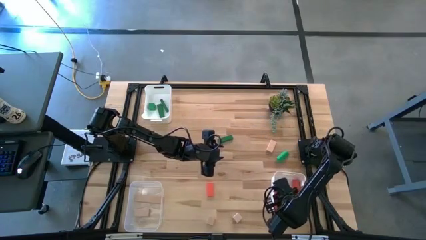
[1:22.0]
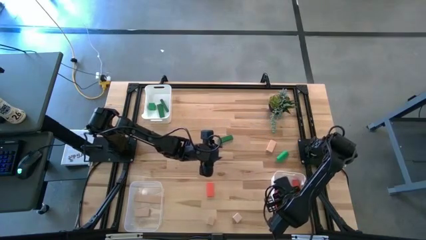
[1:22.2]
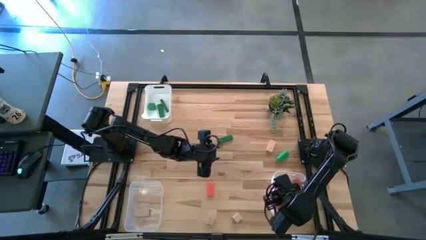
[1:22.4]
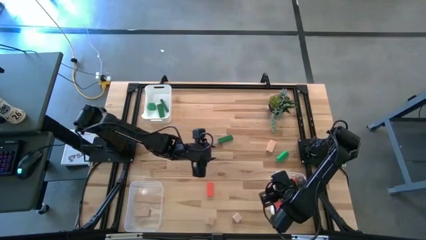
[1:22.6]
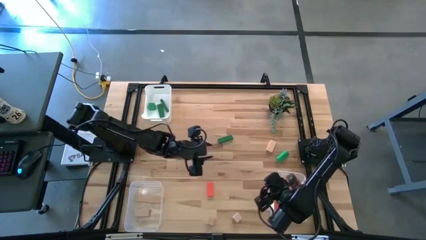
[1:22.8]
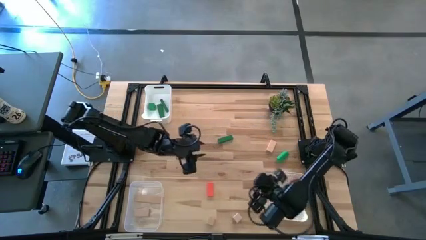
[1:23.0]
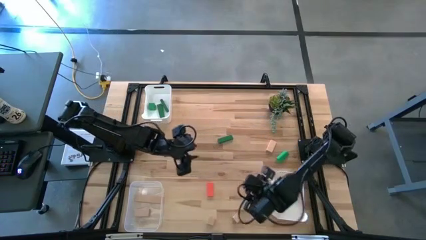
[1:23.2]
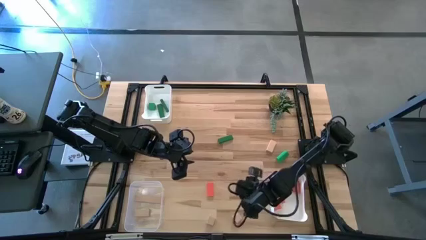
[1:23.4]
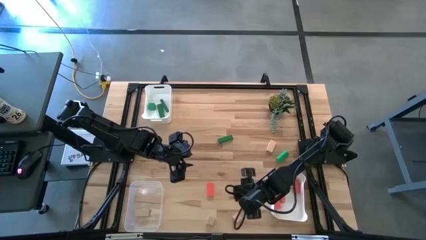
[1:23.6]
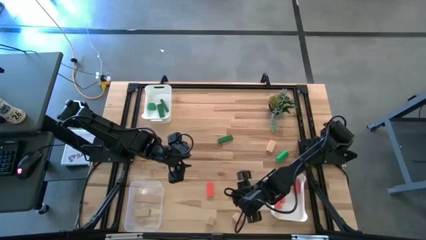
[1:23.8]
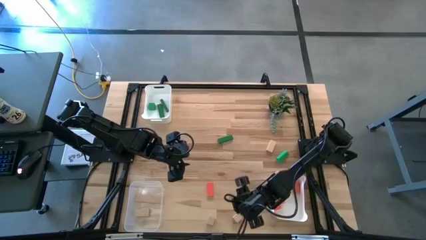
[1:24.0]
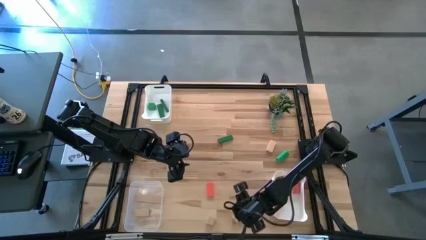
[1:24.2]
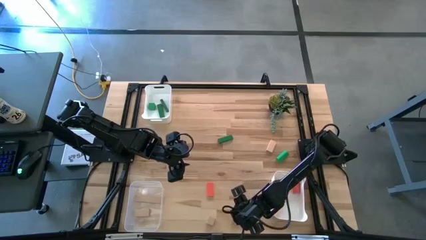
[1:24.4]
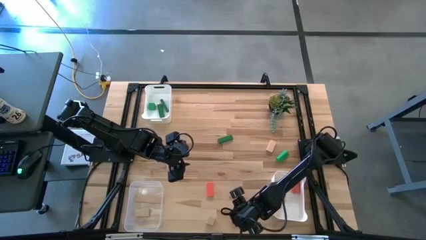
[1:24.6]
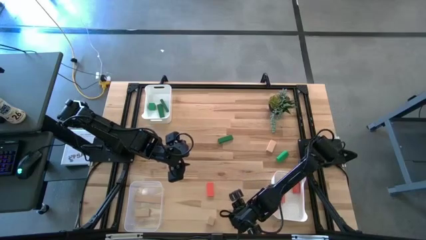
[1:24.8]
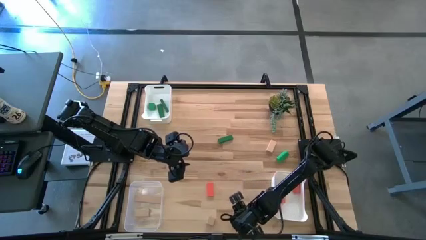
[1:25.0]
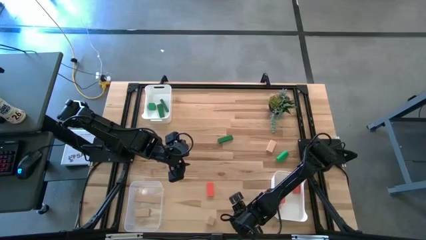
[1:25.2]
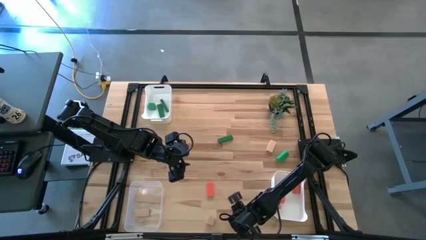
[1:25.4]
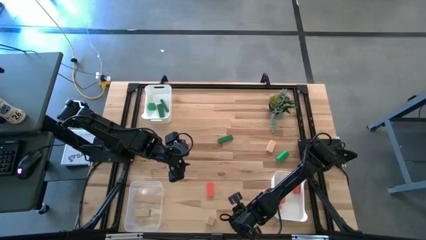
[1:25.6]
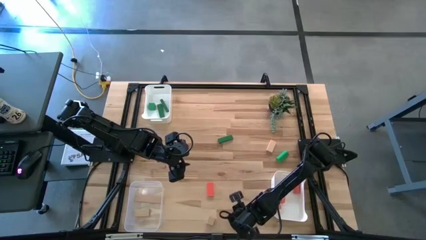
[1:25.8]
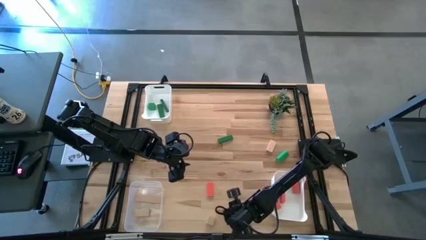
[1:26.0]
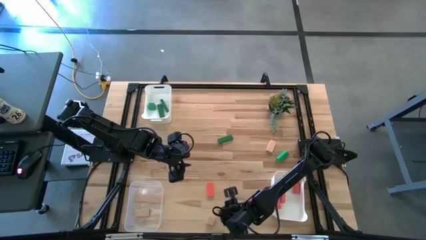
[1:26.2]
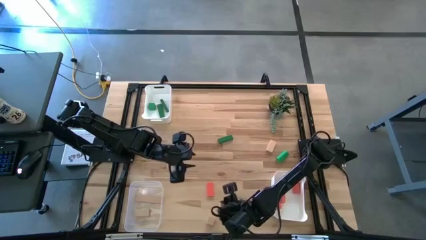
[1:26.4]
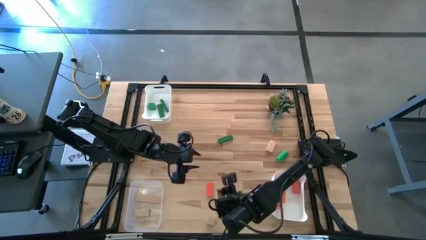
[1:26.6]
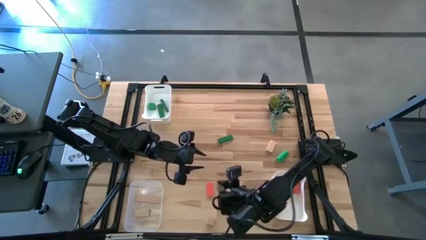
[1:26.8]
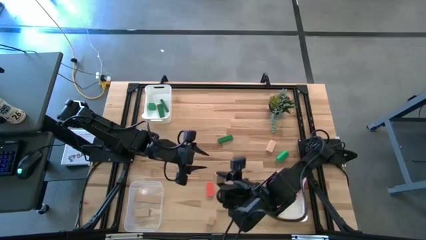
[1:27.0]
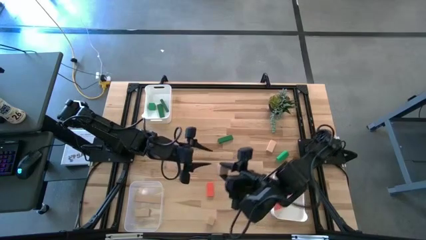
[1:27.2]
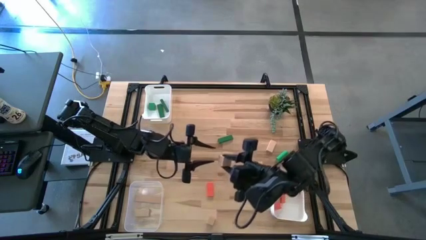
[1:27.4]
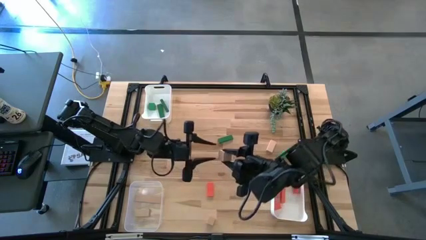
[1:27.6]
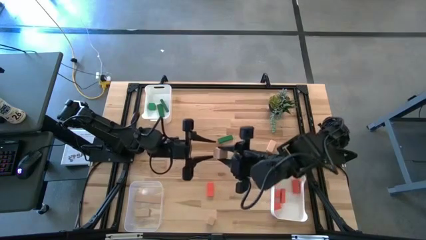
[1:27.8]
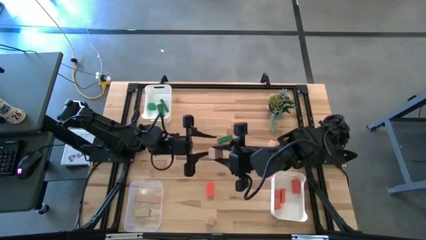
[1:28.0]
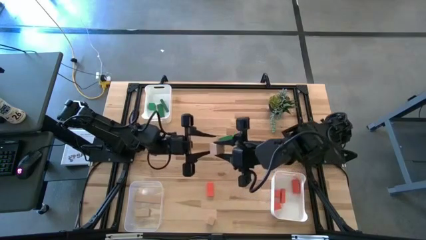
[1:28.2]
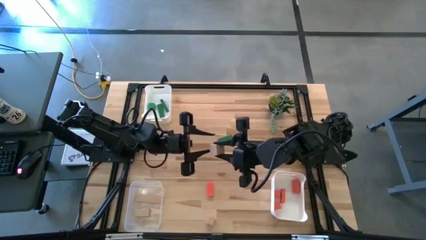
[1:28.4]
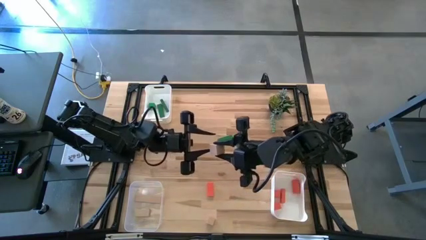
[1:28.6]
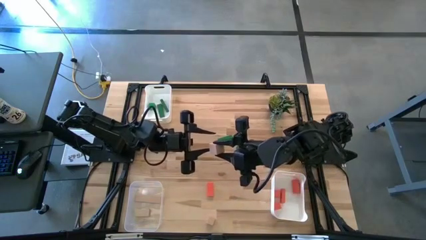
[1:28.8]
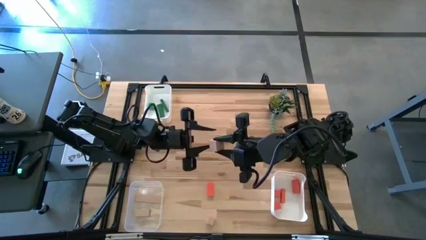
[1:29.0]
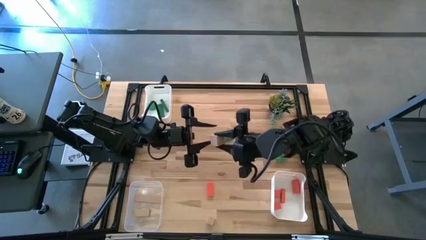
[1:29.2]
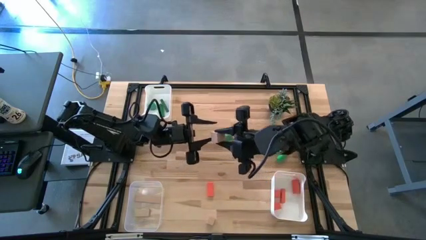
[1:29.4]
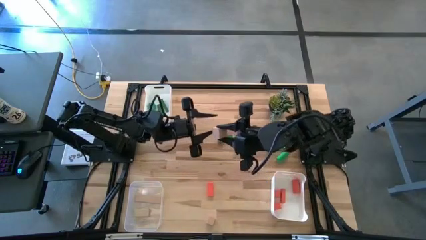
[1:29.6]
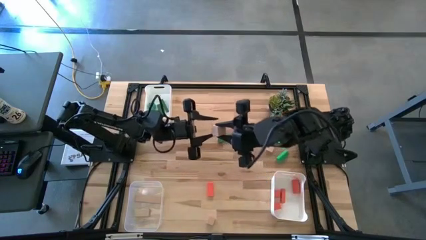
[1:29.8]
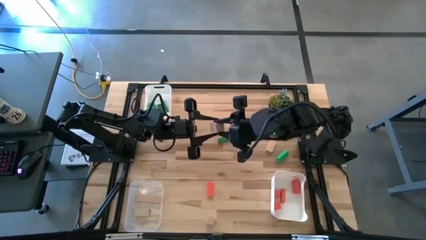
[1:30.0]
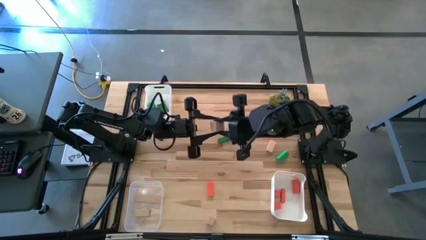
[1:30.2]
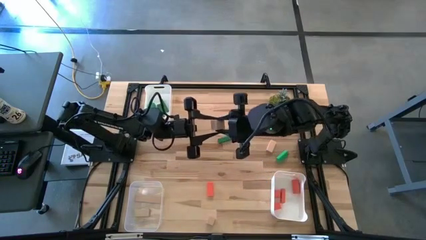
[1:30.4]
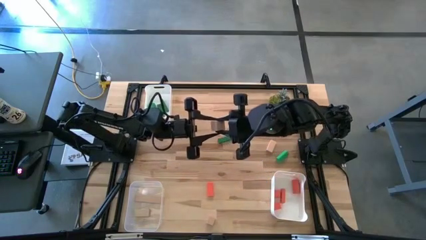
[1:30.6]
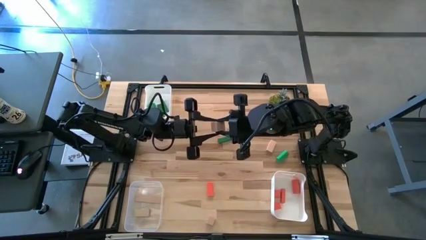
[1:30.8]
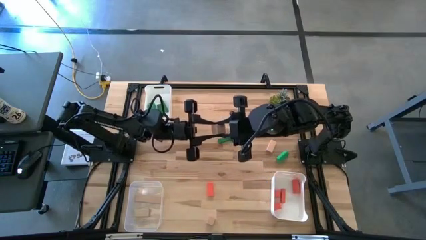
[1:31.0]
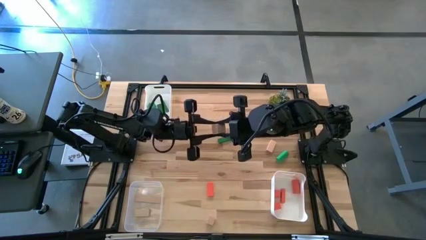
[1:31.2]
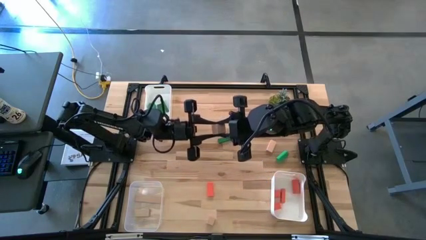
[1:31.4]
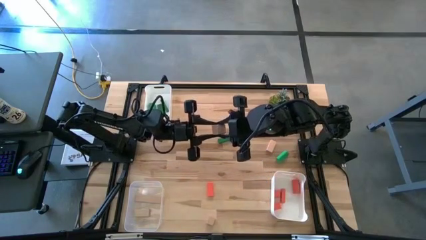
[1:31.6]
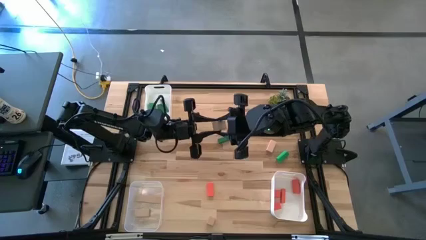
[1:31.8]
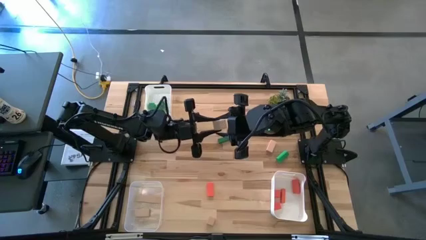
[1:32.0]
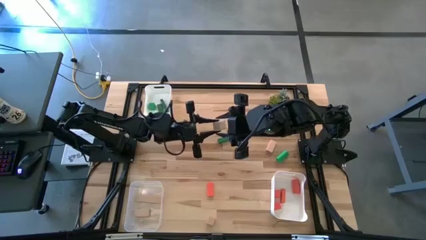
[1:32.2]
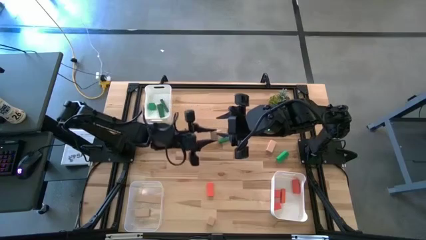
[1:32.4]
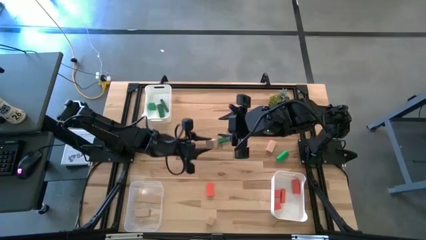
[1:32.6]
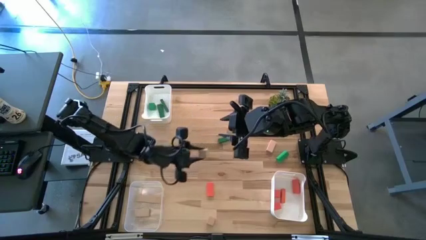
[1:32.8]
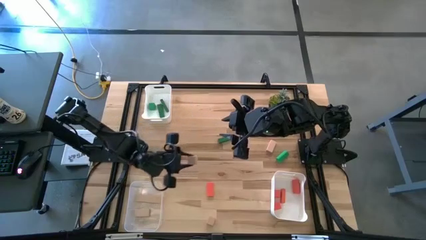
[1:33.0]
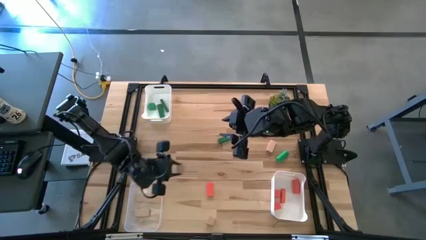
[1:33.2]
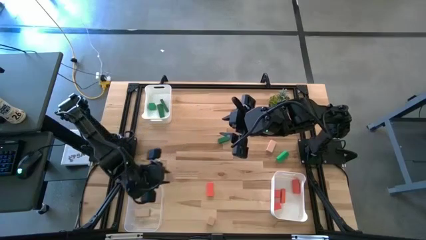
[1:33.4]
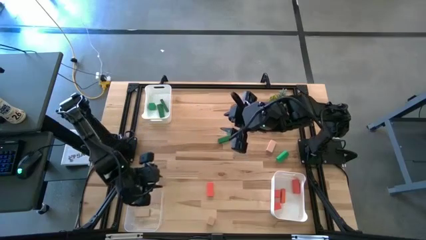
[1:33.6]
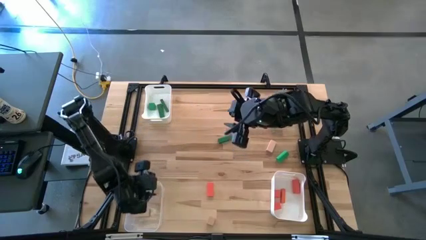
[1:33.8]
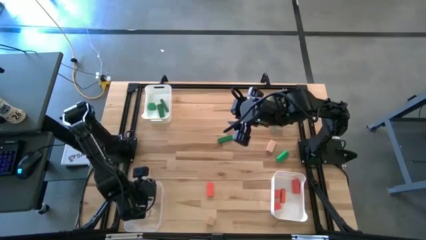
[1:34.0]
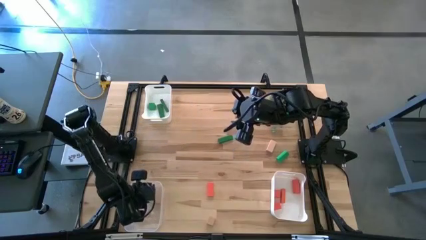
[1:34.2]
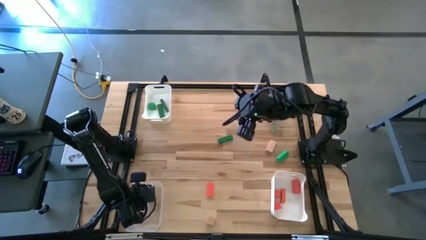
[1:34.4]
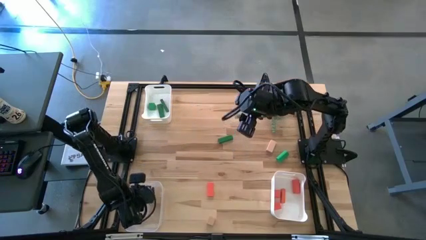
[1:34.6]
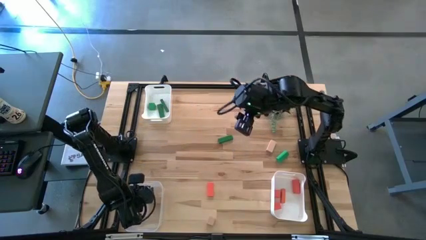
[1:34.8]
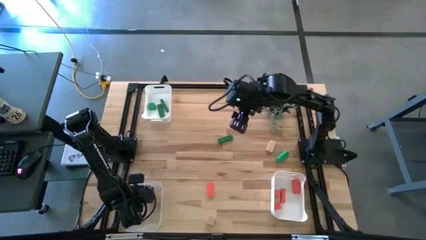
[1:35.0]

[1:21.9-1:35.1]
Task: Sort & place blocks by color
Put the brown block into the transparent bin

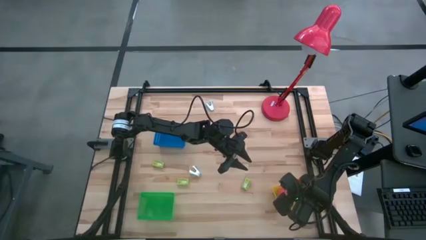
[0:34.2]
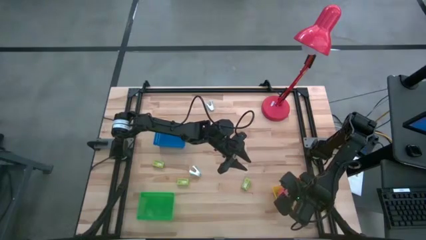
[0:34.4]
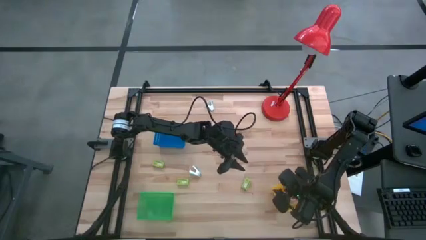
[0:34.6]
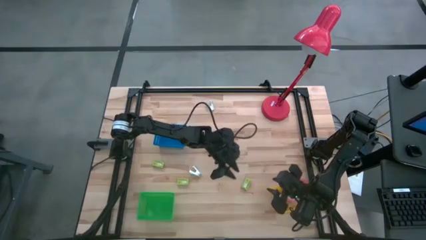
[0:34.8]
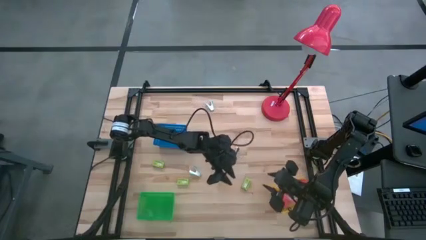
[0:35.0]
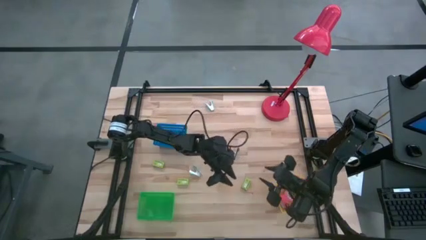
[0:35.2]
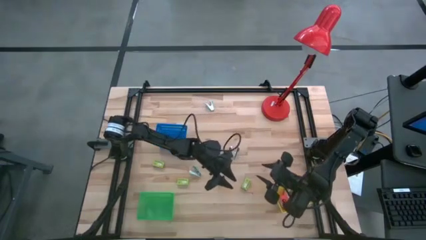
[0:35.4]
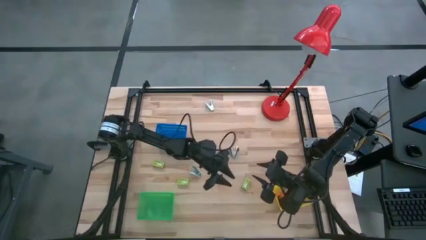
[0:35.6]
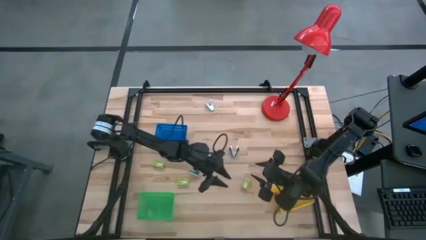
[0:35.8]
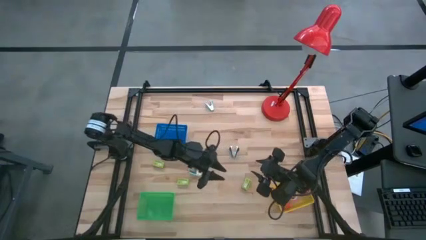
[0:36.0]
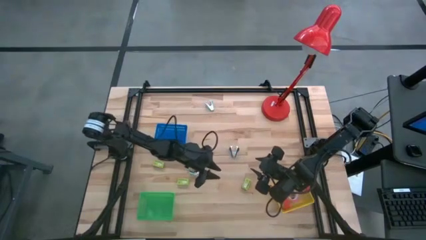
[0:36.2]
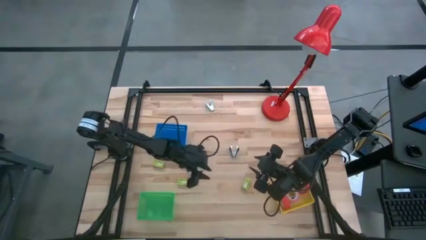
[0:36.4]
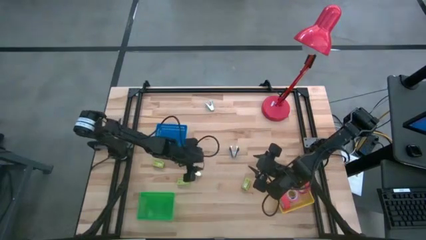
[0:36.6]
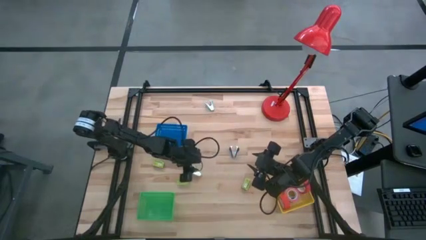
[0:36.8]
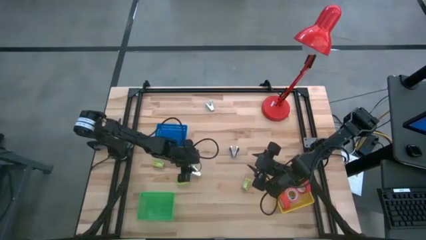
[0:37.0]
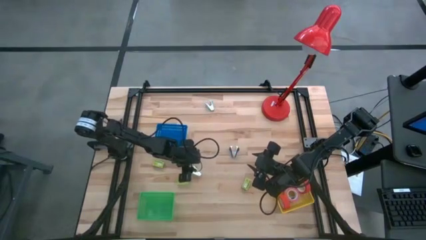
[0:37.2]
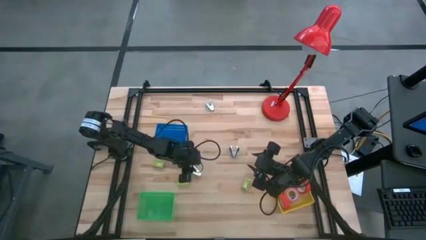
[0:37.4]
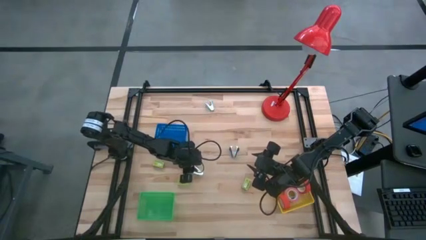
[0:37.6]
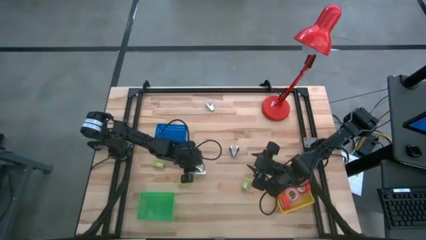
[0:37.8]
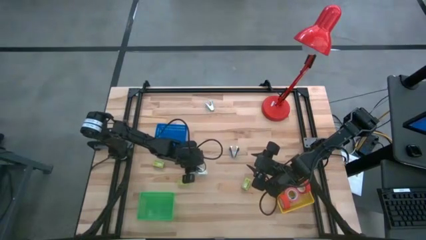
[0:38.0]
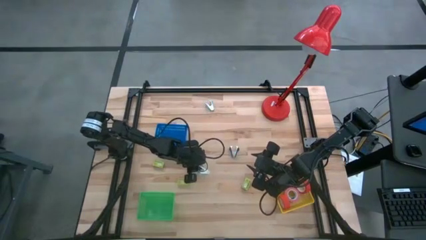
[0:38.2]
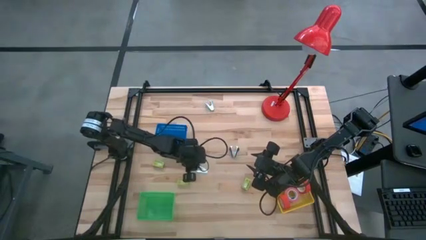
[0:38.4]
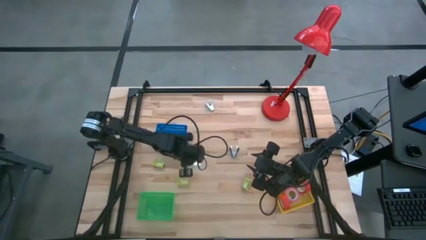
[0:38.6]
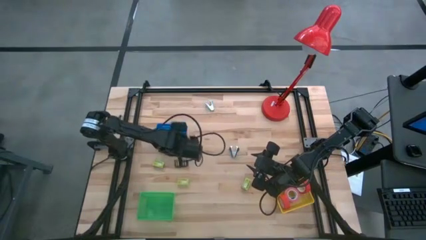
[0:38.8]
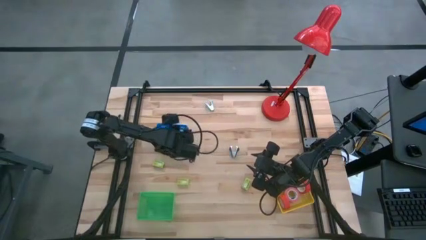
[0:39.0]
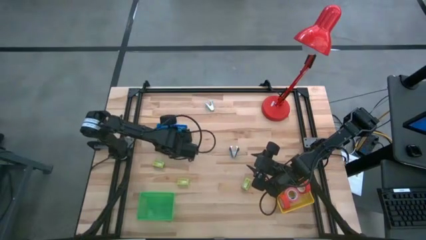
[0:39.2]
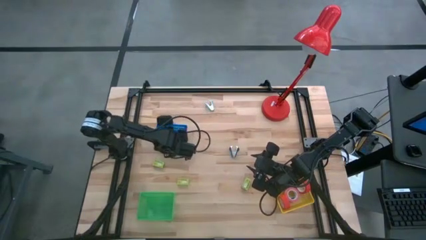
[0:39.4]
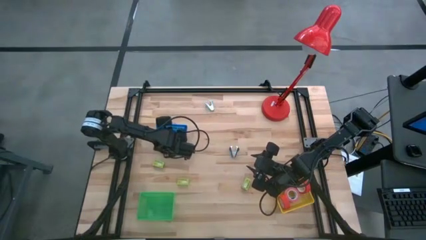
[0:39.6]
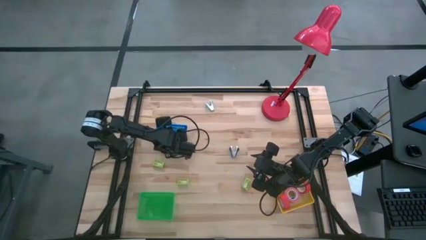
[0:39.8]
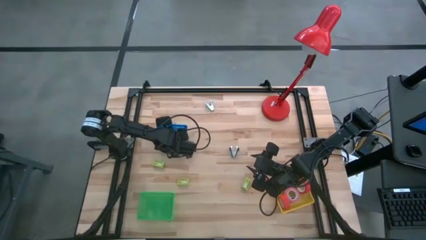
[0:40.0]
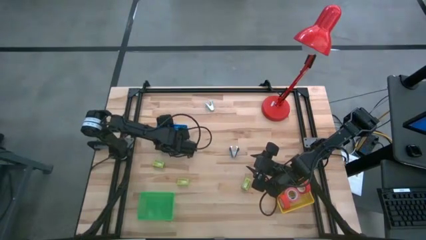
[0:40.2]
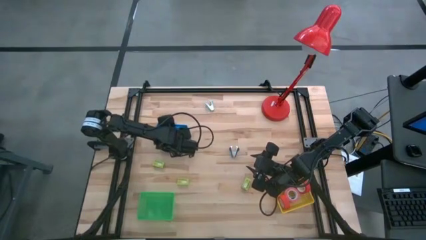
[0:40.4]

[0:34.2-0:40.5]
Task: Pick and place Stapler, Stapler remover, tape
Put the bottom sky blue staple remover into the blue bin
